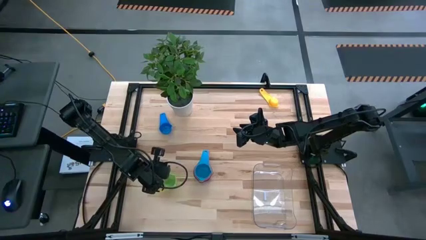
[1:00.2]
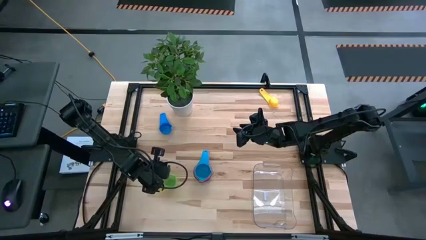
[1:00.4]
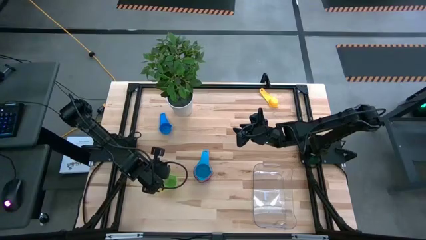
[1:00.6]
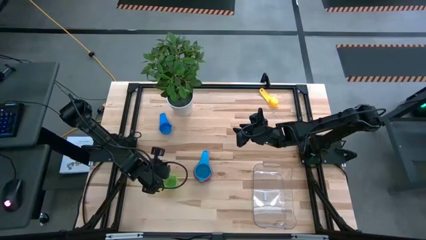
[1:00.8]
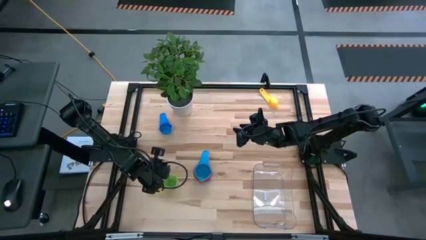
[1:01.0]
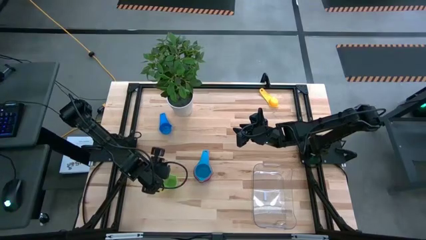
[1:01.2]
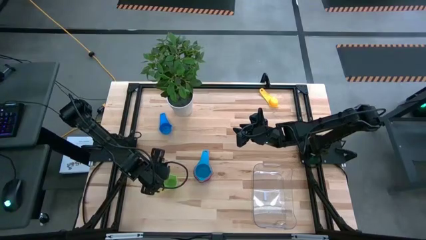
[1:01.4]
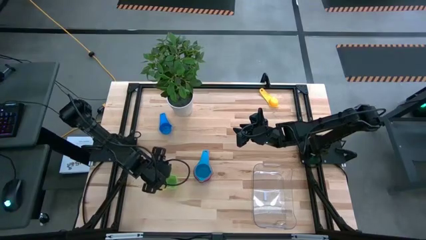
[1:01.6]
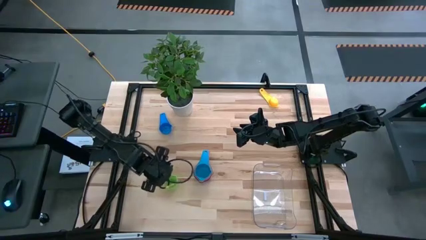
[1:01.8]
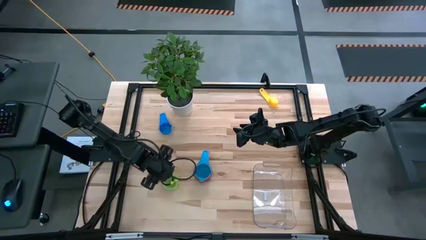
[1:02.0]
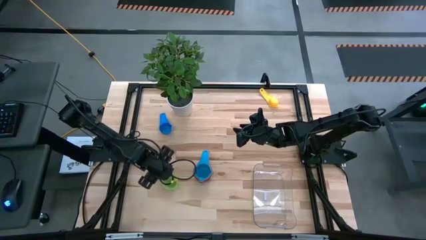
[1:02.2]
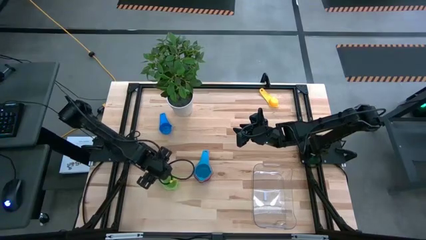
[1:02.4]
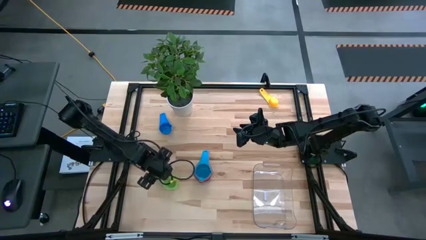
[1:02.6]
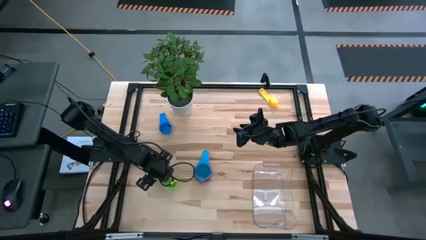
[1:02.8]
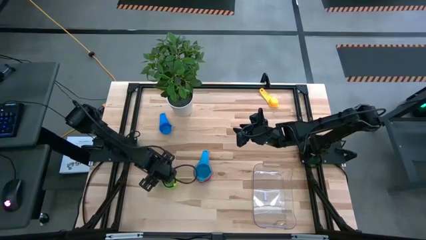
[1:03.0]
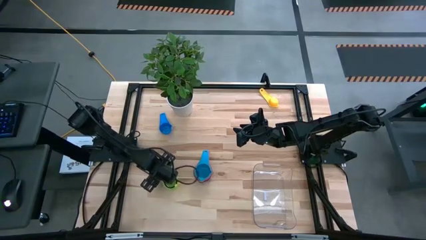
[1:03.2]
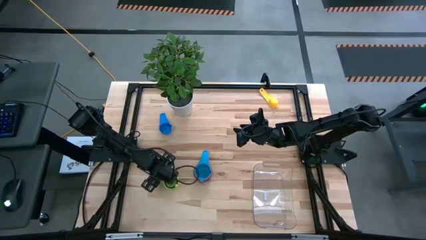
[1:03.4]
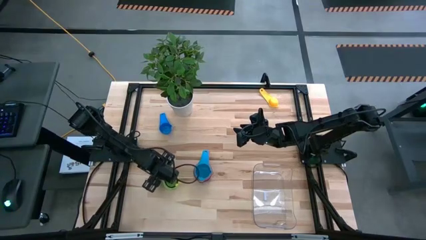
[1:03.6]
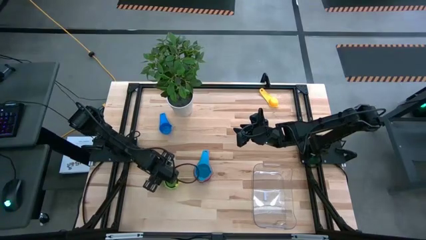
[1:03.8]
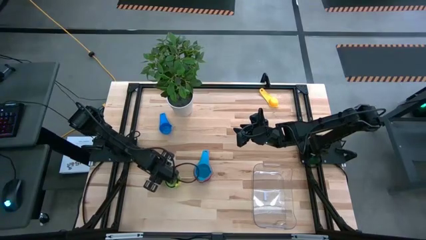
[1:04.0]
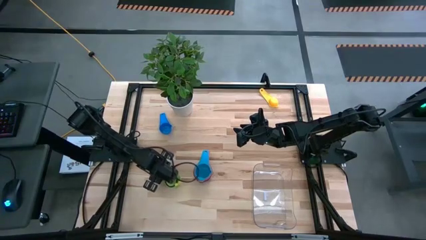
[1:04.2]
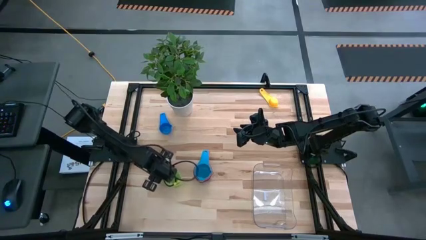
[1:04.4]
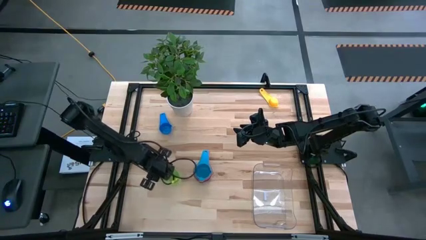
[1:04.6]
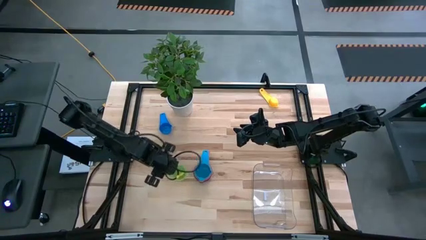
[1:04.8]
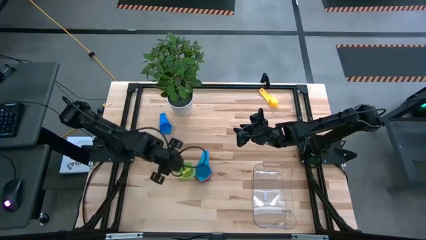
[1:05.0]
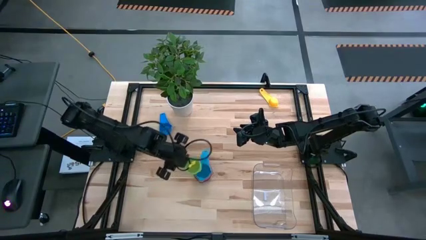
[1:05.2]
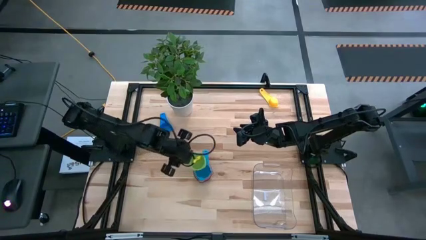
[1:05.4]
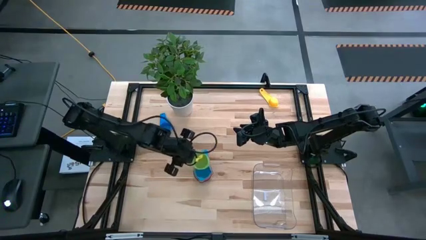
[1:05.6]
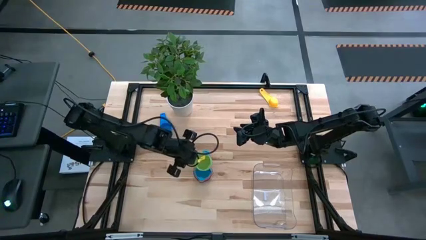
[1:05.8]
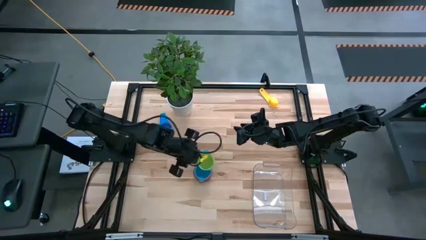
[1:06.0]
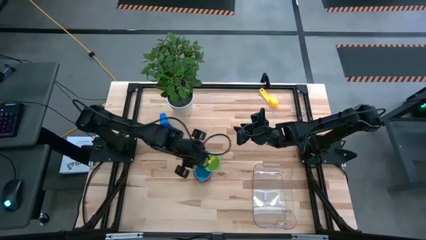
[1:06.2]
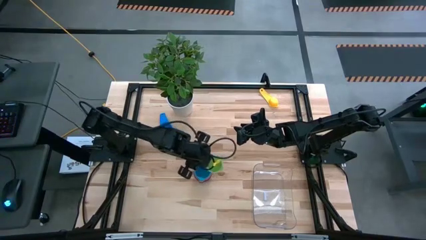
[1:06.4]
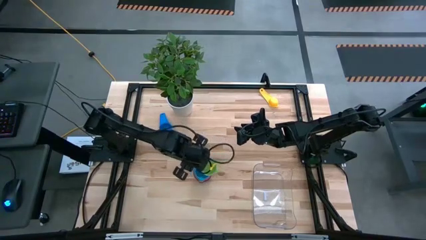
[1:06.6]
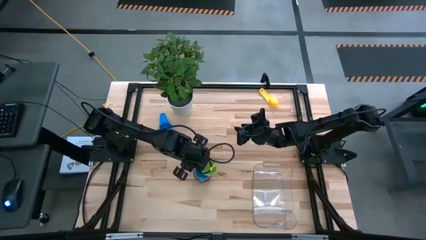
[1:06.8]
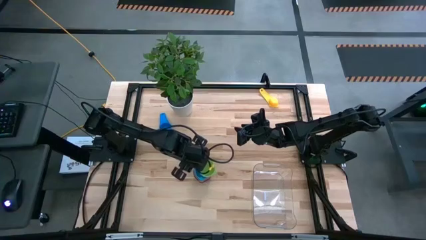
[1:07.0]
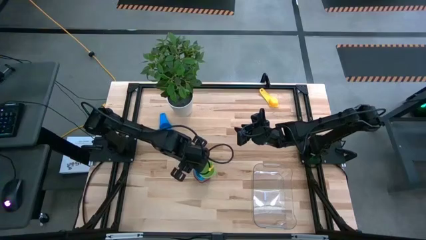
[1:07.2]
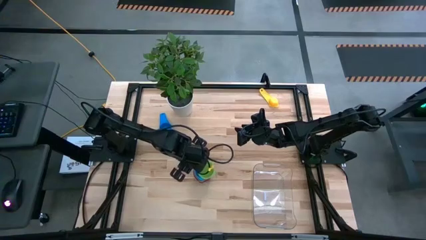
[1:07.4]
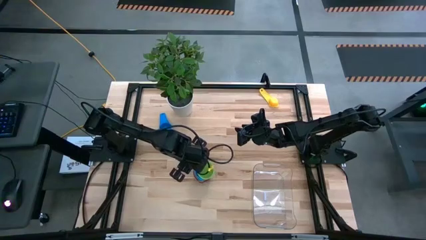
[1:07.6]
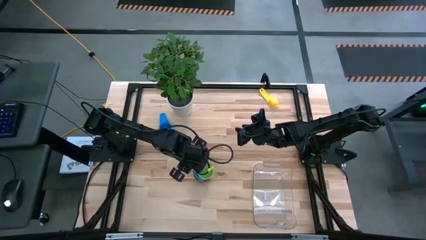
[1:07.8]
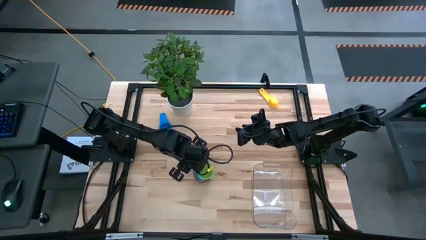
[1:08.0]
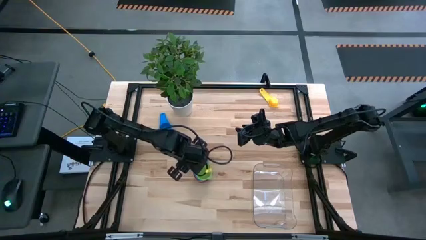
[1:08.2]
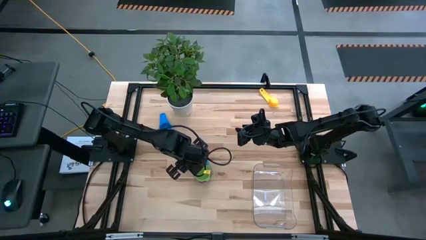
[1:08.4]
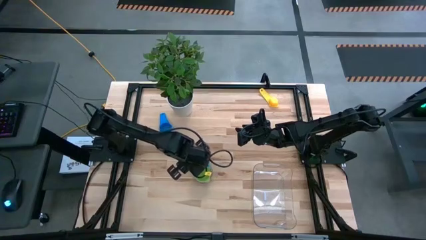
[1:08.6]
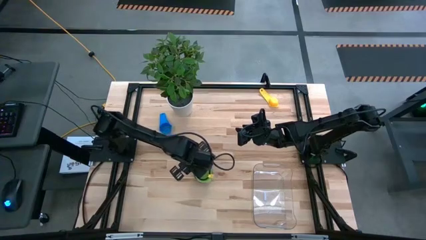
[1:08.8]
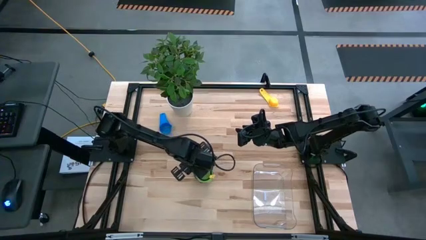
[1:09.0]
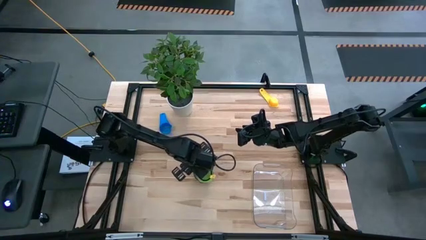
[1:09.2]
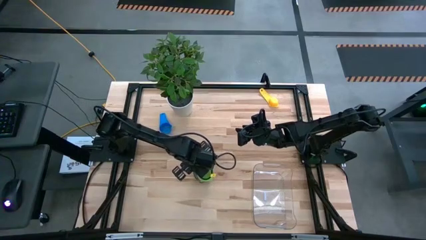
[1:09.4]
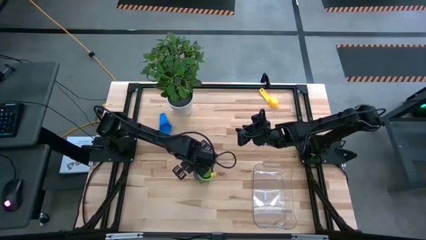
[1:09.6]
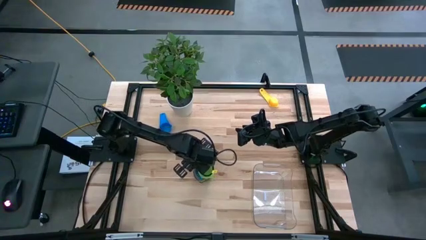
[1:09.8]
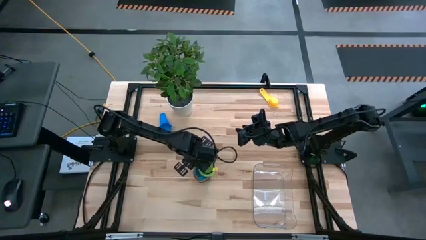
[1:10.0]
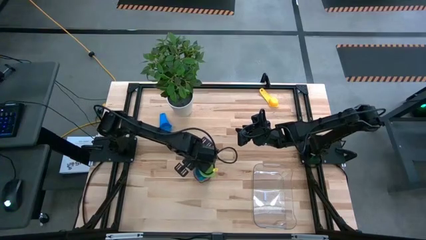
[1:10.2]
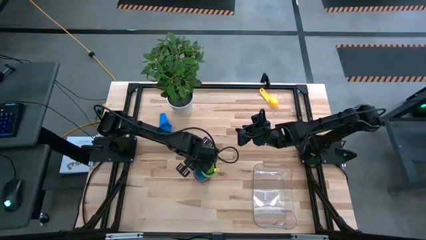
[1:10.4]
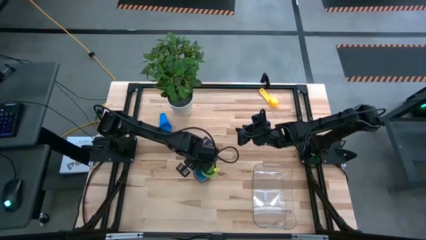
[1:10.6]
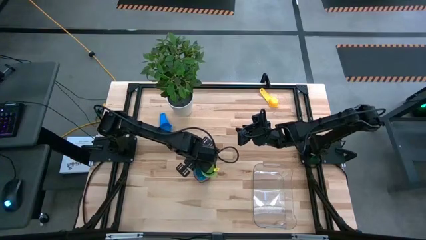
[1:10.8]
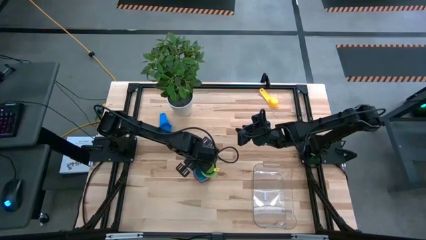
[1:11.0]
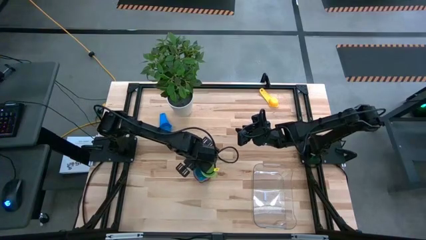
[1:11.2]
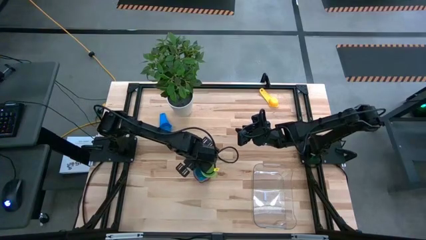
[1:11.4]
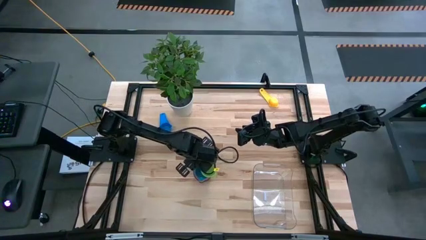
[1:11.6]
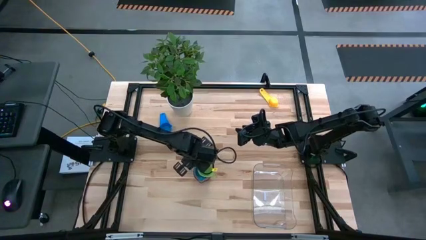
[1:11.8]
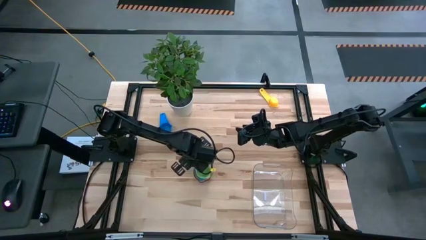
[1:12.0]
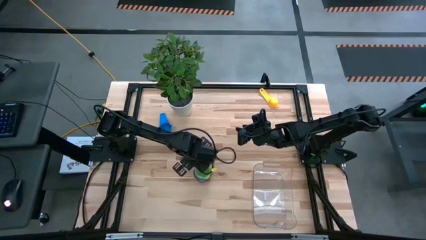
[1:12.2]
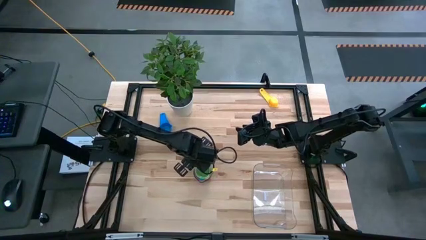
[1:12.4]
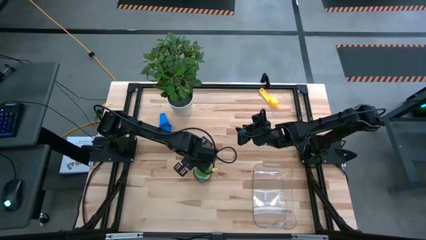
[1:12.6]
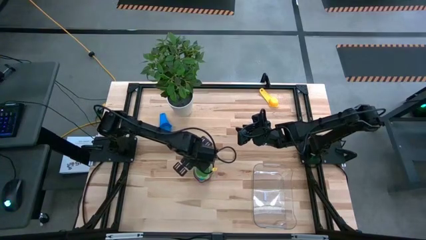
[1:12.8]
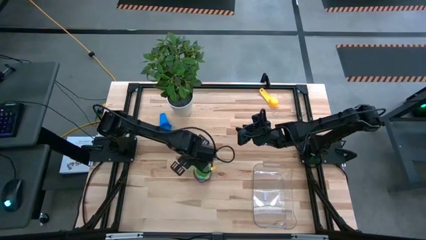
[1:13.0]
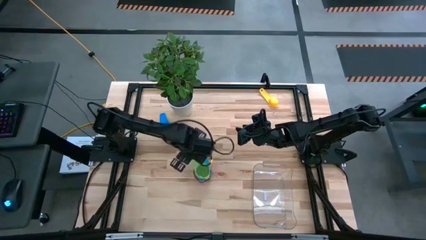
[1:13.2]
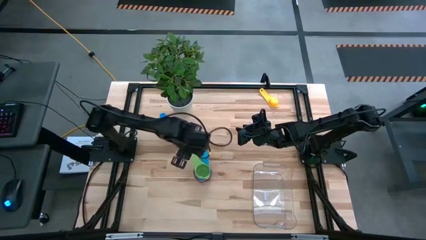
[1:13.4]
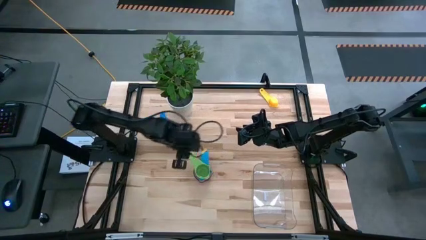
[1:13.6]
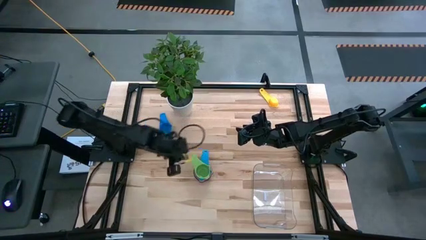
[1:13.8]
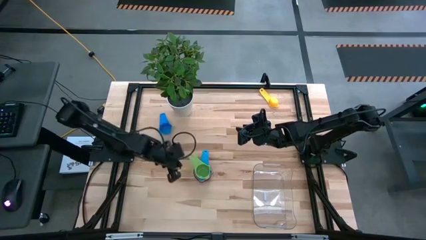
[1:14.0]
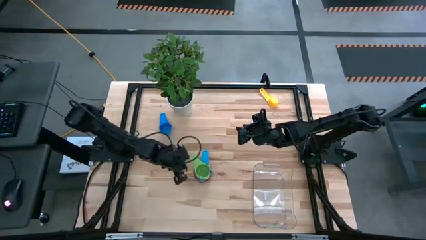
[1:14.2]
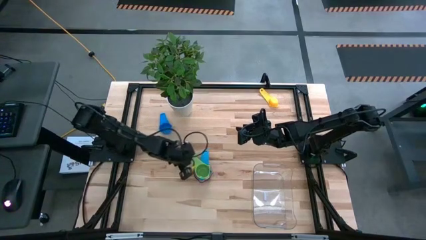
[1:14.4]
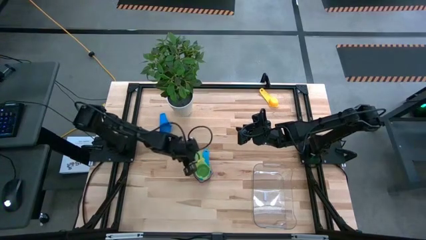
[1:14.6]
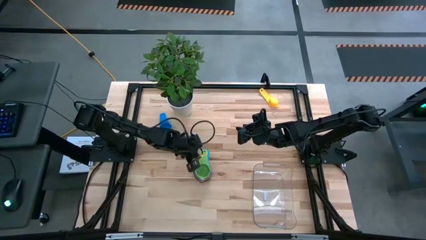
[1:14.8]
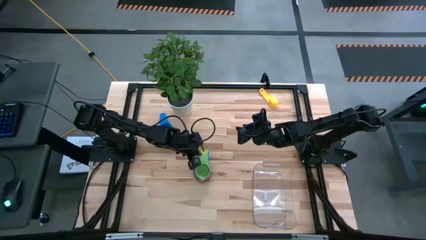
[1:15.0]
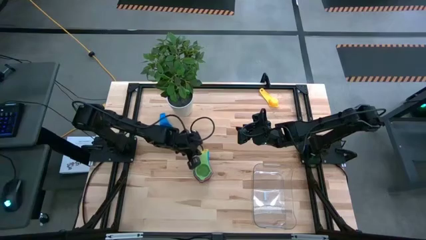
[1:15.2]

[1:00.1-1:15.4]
Task: Nest measuring cups in basket
Stack the green measuring cup on top of the light blue measuring cup
